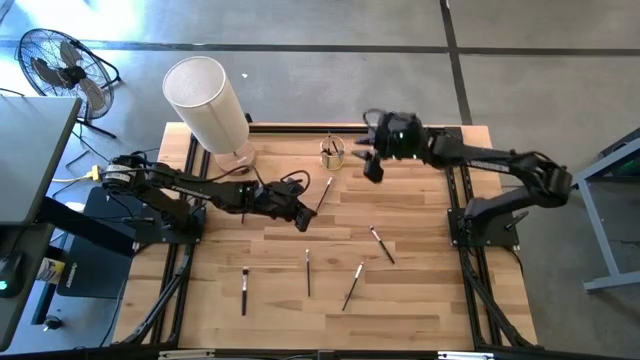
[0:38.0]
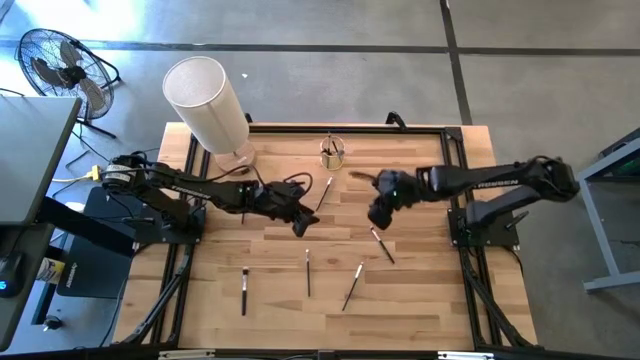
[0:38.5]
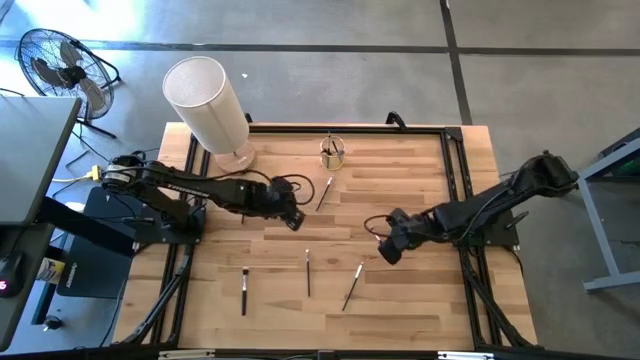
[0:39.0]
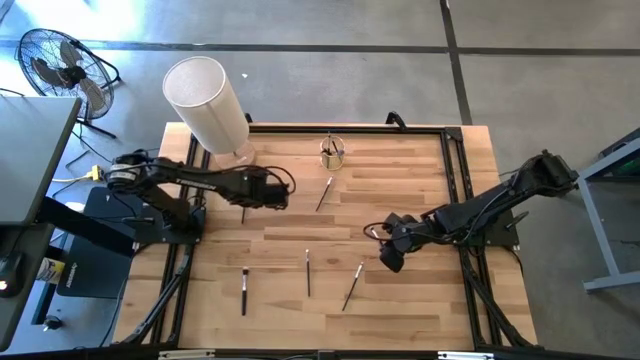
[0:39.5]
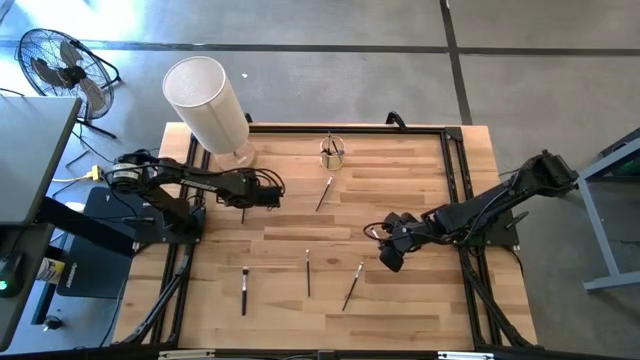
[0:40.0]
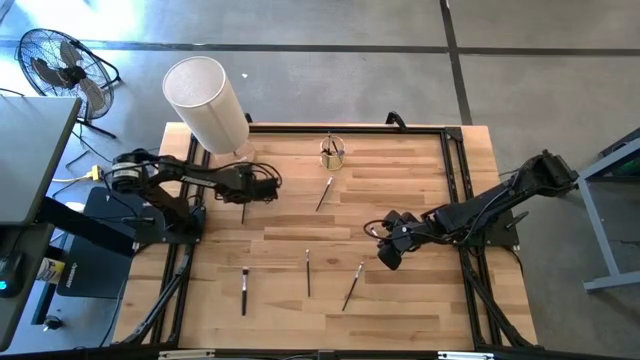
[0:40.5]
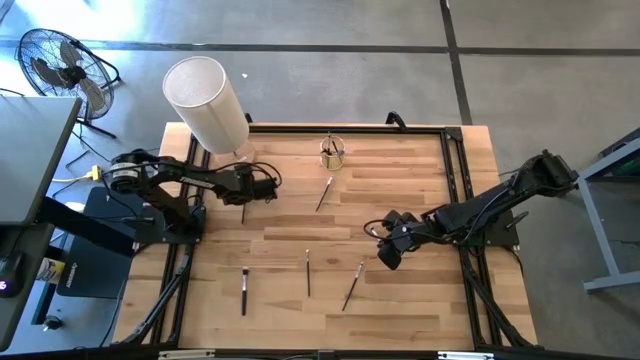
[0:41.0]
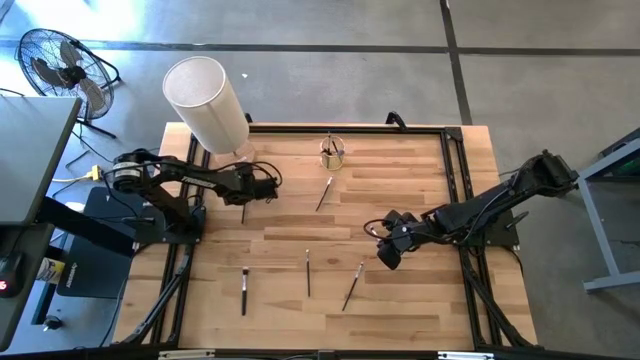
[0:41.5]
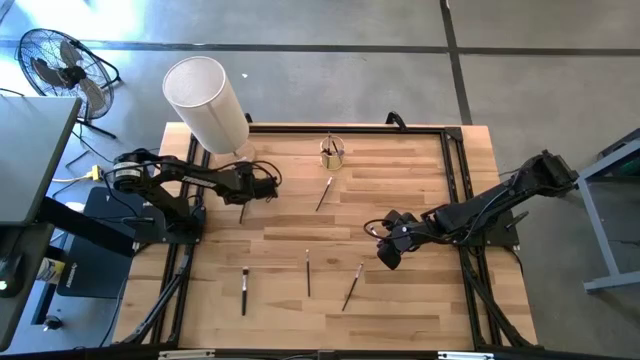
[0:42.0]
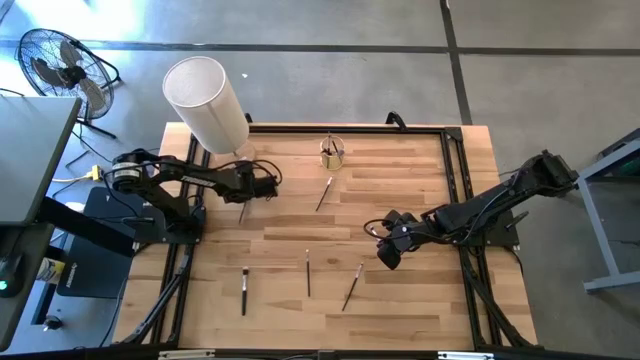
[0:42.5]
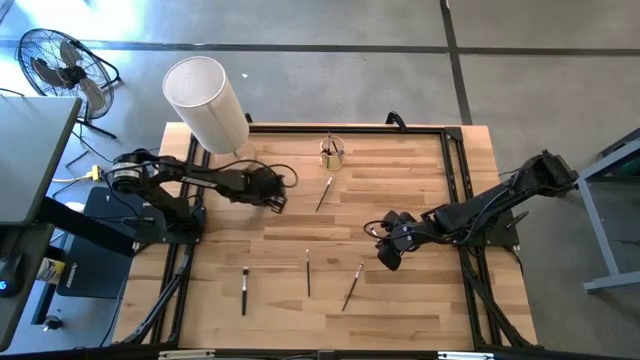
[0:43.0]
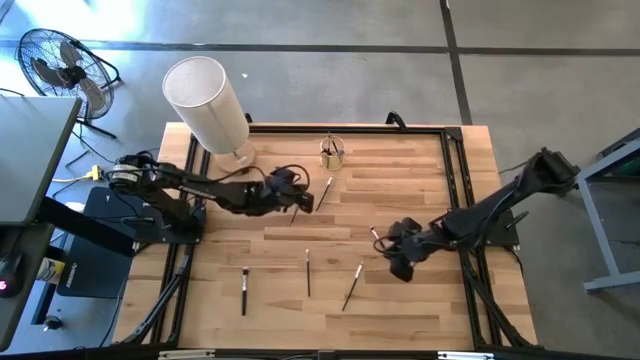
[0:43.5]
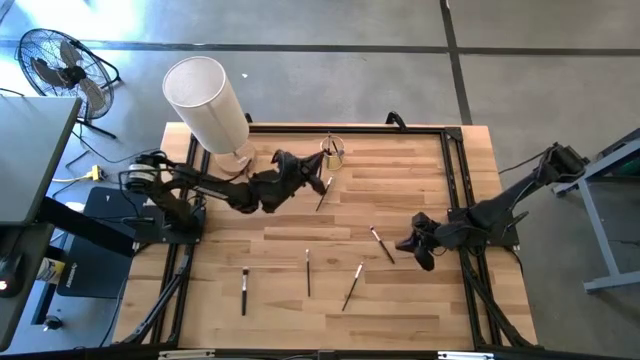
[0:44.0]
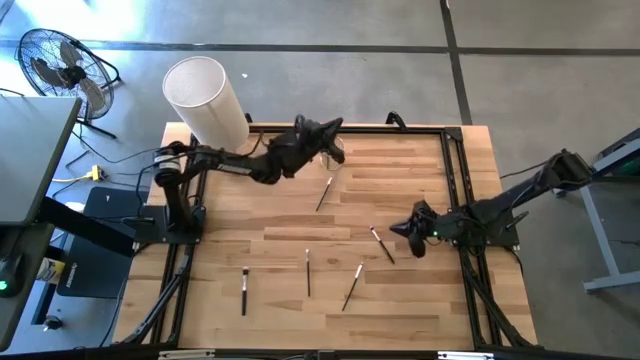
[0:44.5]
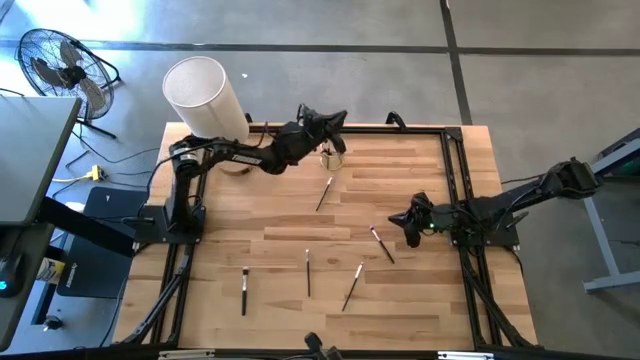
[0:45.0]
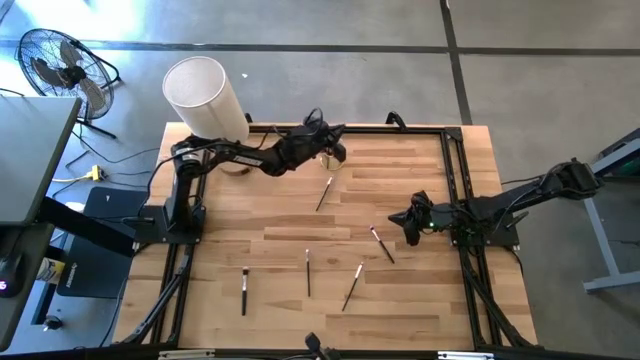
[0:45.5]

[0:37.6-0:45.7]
Task: Sort items
Put the angle shadow brush into the glass

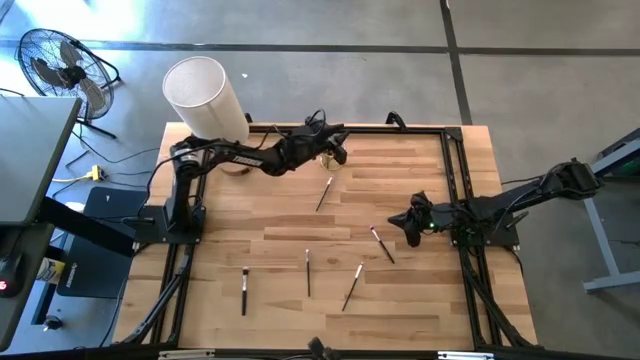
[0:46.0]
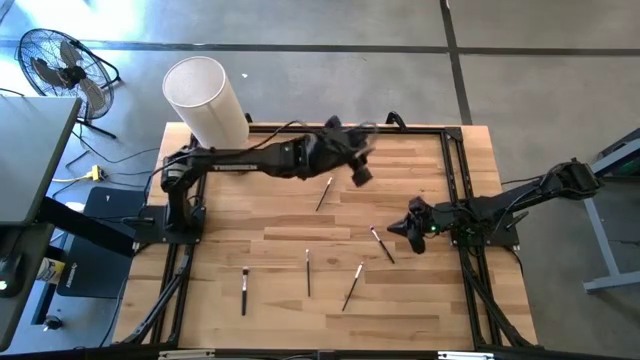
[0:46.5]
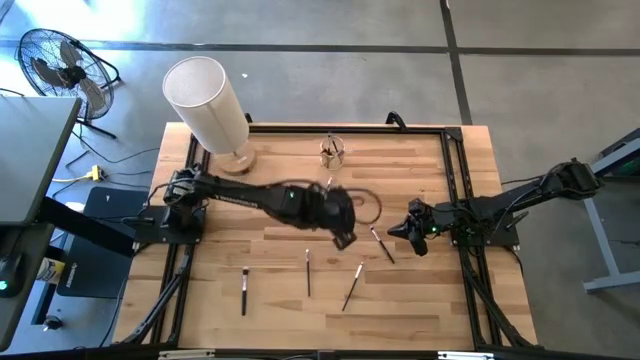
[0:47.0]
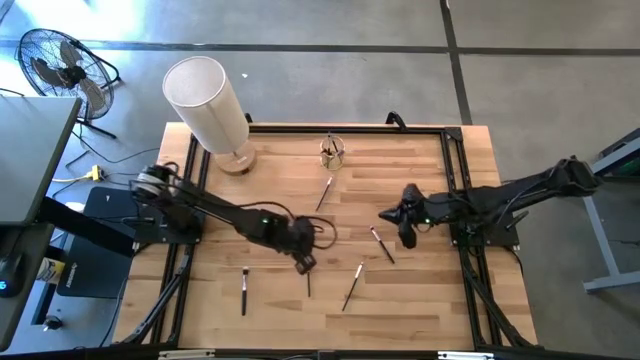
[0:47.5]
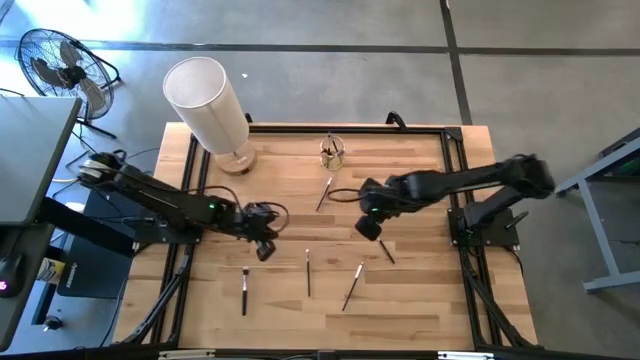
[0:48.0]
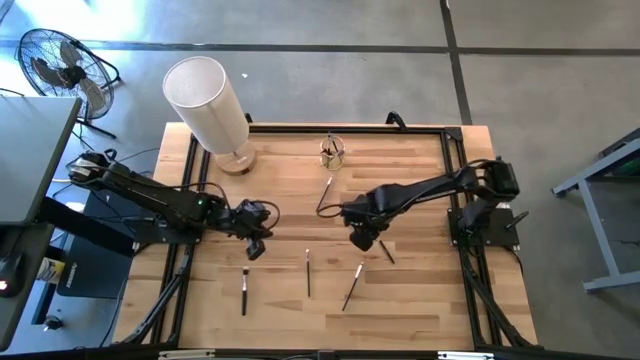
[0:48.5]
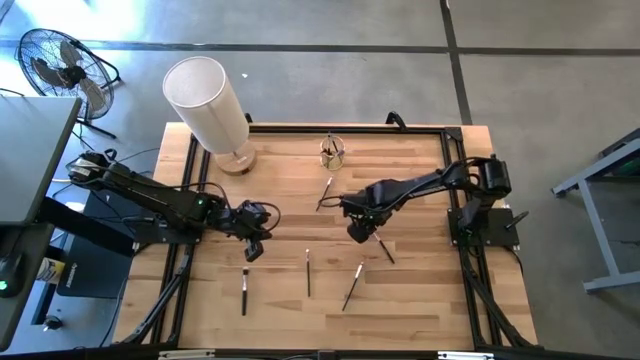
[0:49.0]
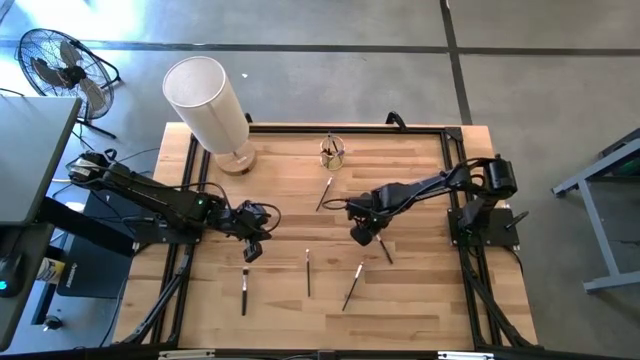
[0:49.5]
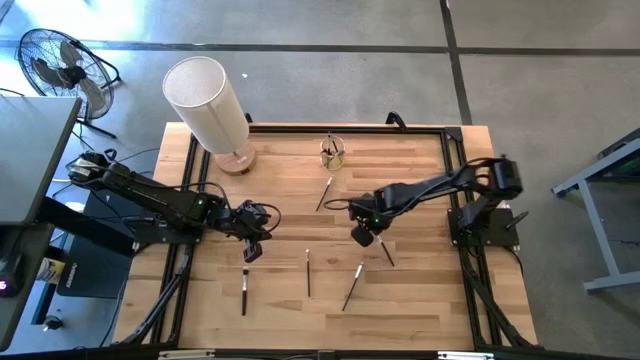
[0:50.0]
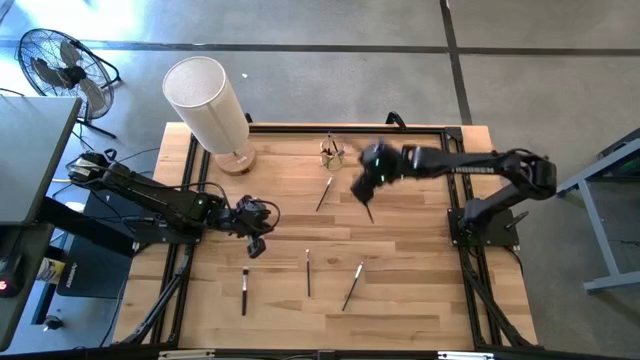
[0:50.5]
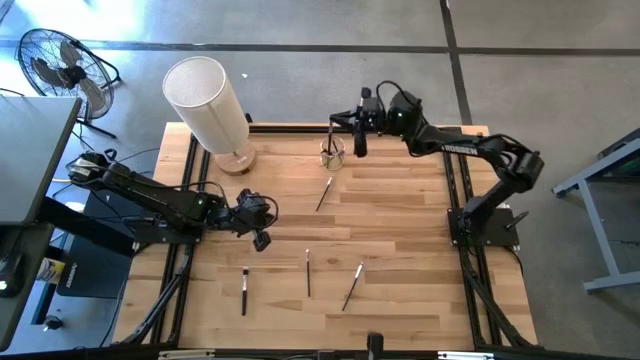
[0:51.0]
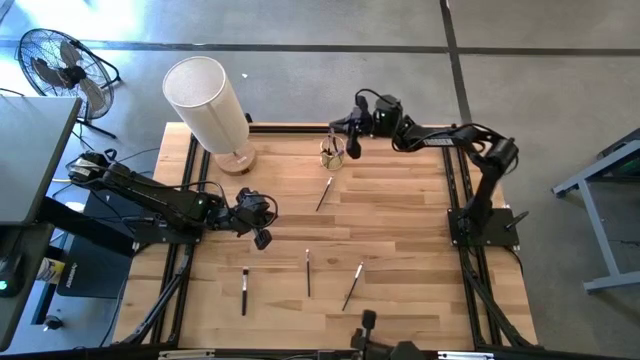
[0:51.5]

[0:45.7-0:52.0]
Put the angle shadow brush into the glass

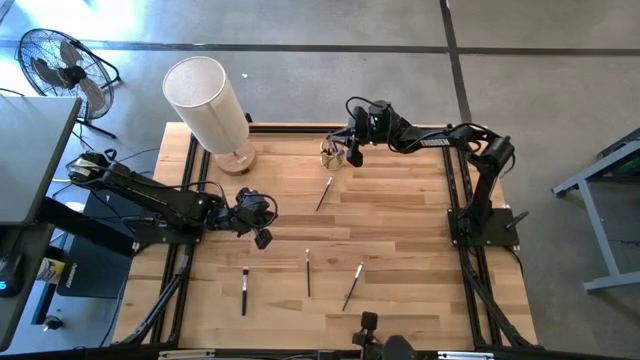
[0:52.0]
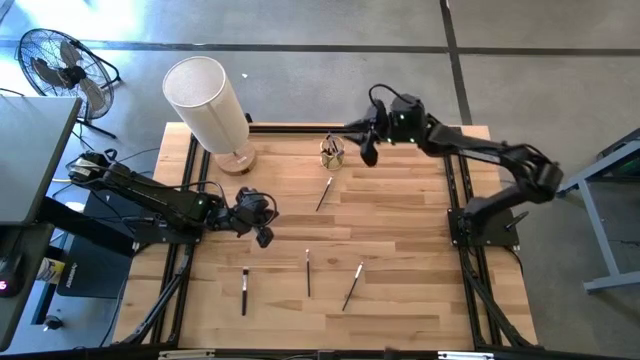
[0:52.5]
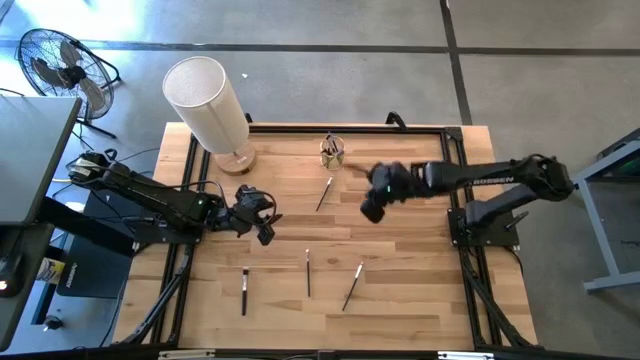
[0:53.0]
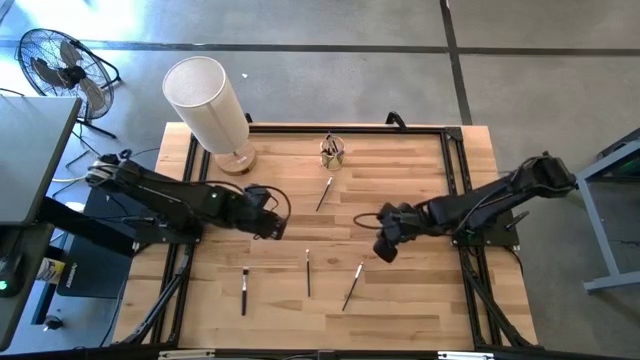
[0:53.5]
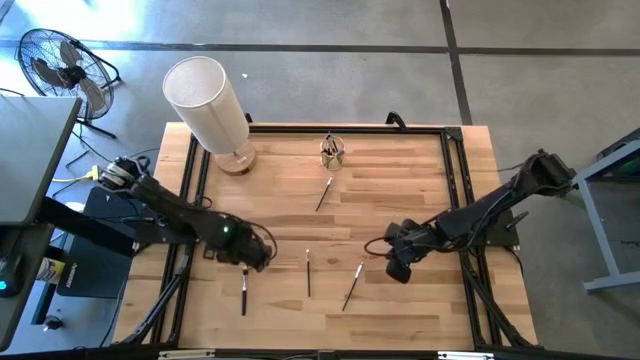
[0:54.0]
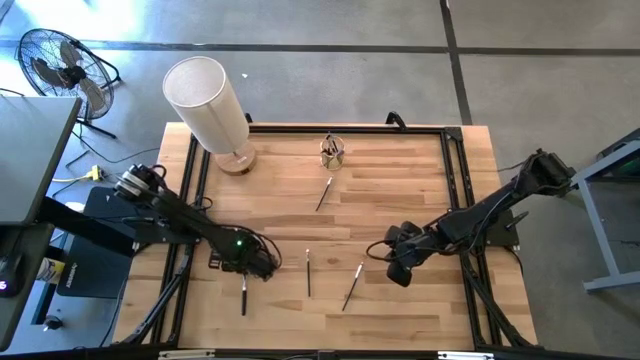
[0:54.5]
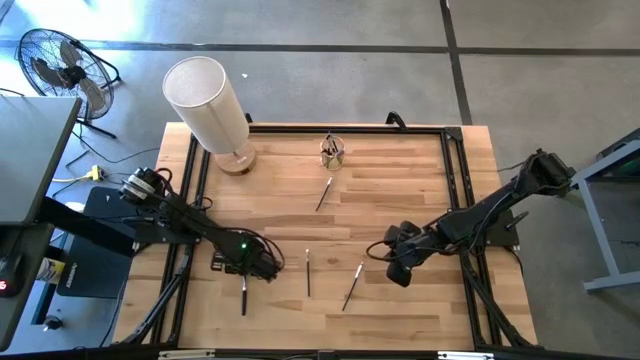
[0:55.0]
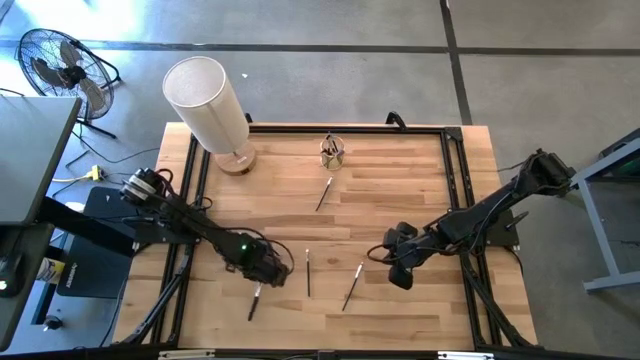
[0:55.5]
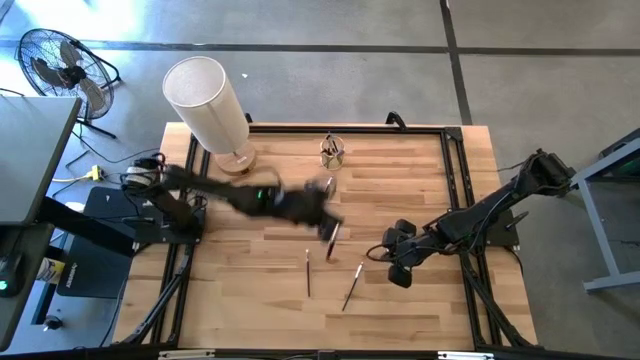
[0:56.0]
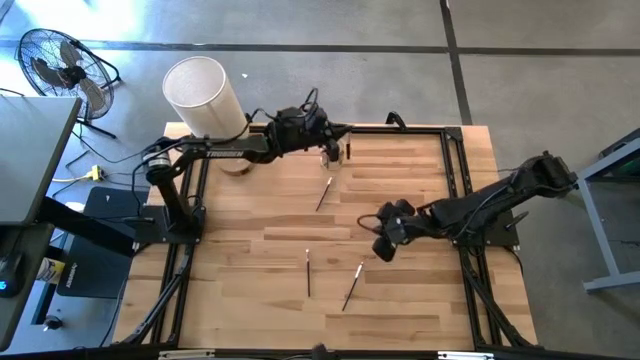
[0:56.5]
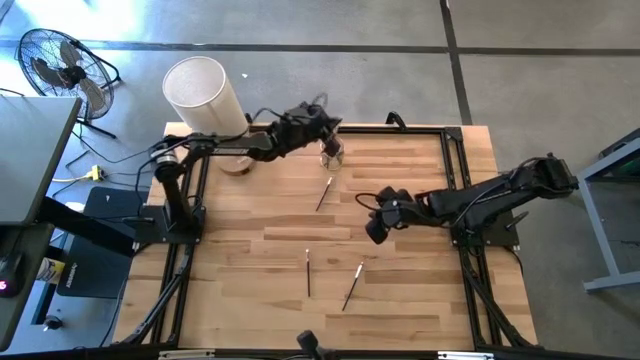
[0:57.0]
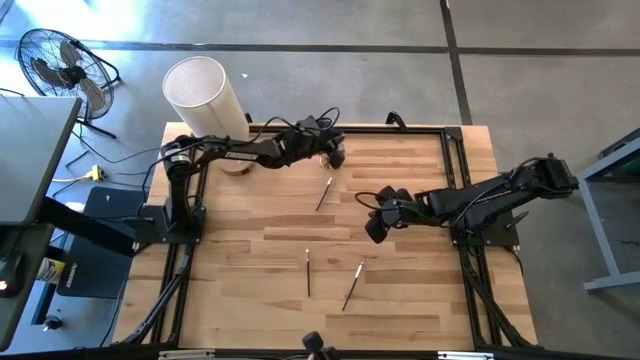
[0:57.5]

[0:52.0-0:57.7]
Put the small fan brush into the glass

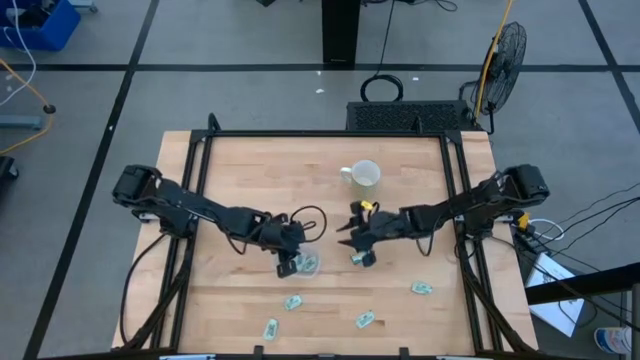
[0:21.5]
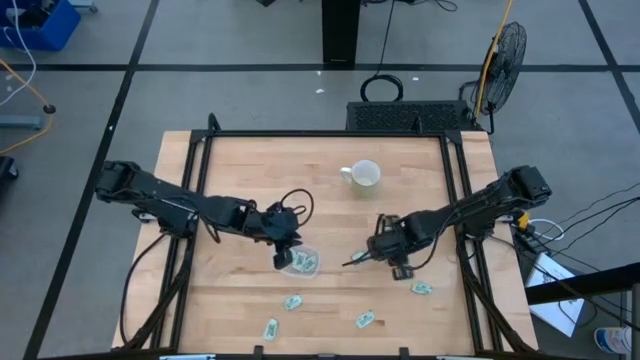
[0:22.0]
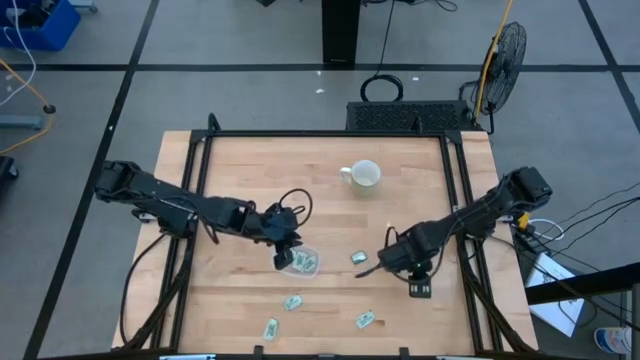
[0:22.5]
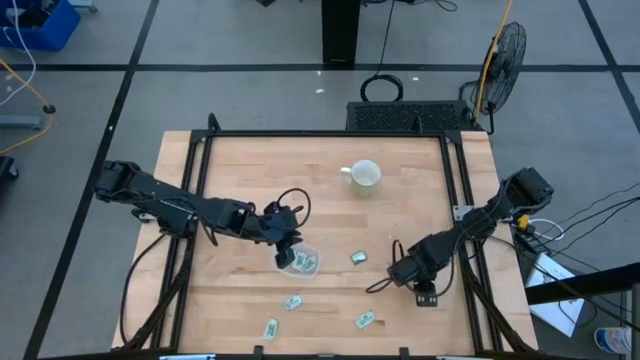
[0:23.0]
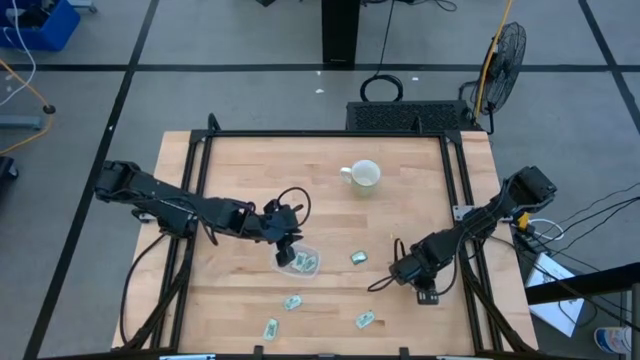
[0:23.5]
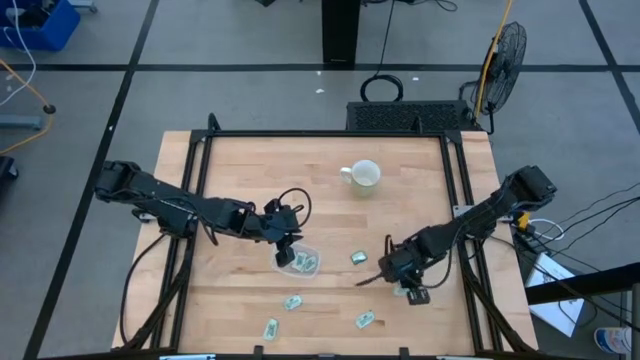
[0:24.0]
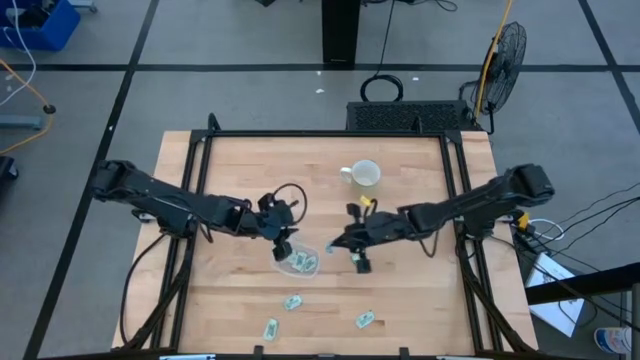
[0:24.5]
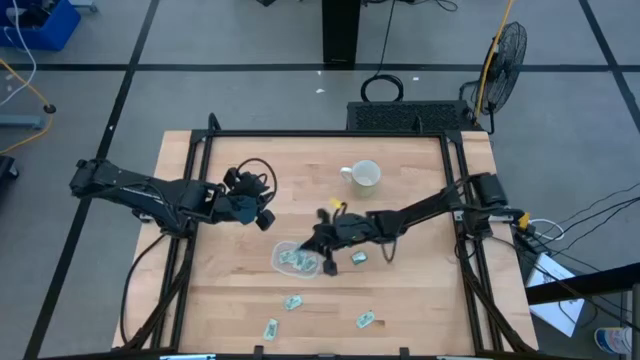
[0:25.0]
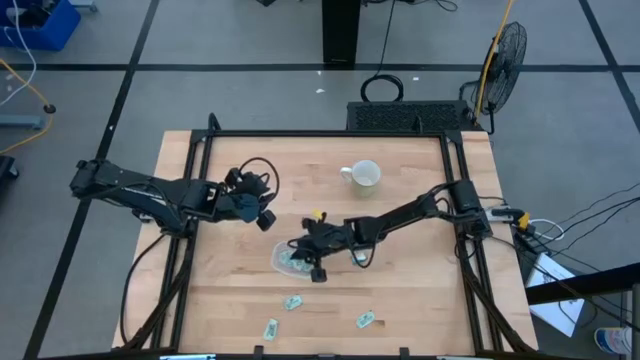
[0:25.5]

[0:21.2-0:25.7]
Task: Pick and place Stevia / Truvia into bins
Put the light green stevia packet into the transparent bin
